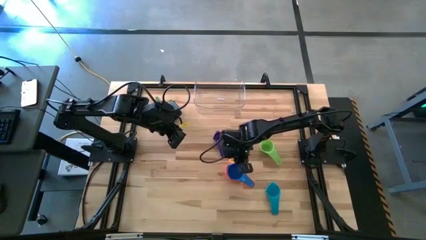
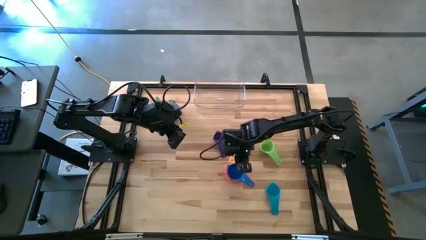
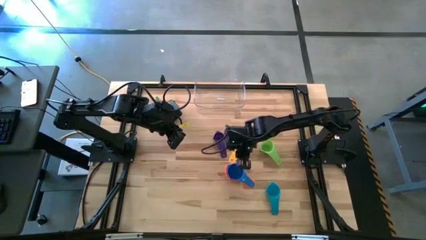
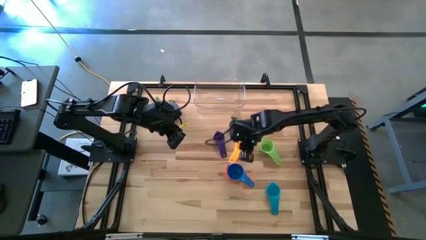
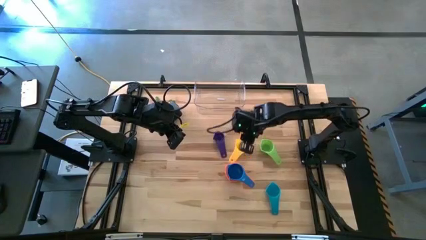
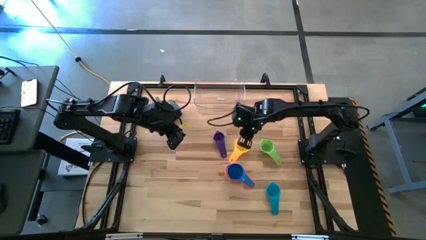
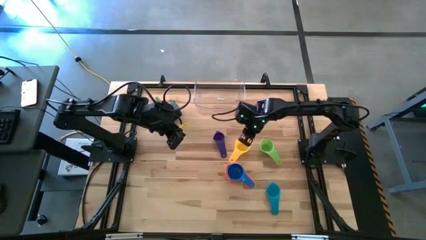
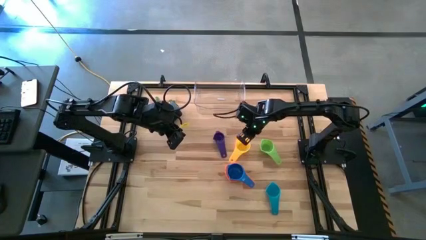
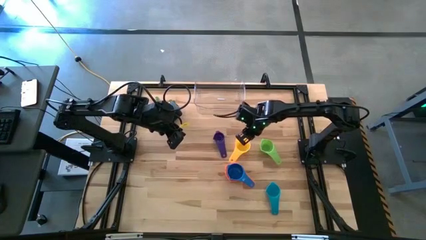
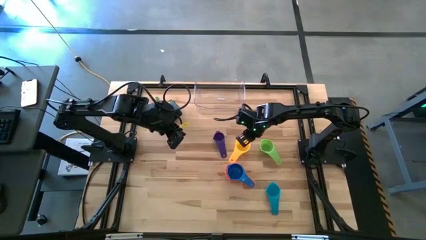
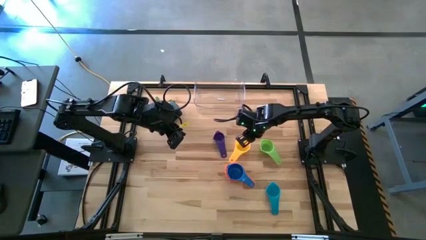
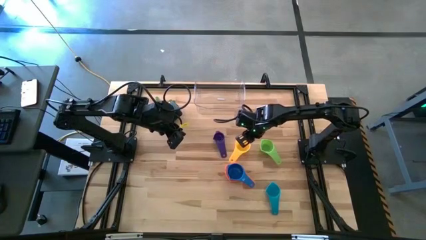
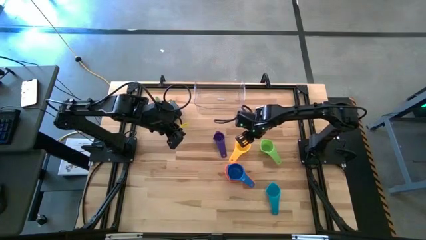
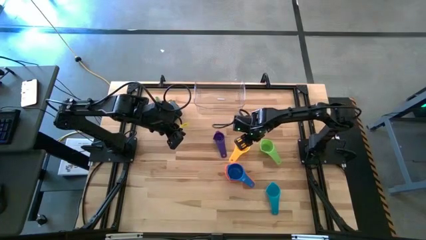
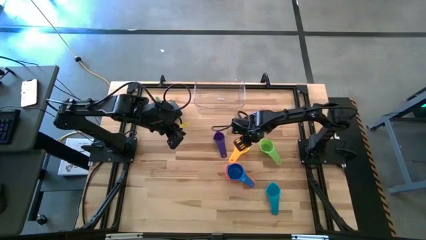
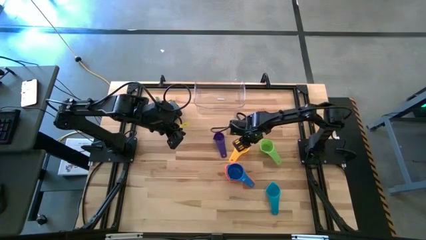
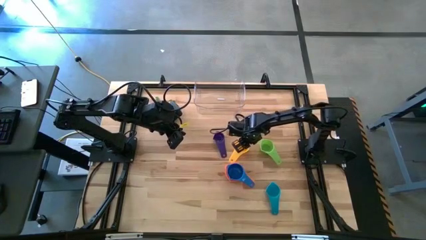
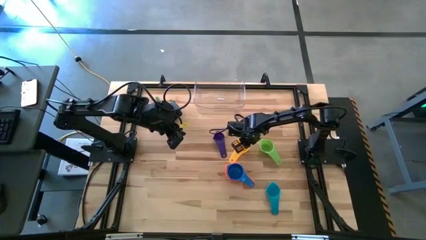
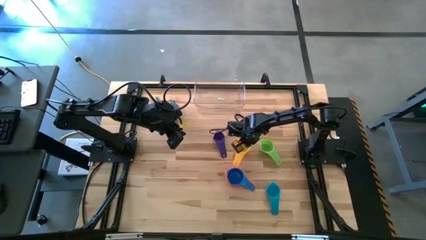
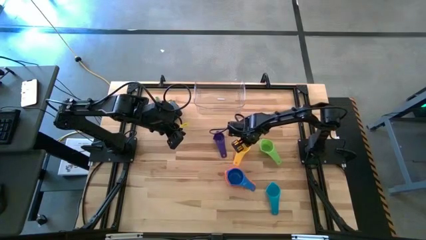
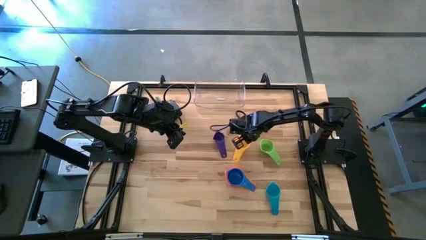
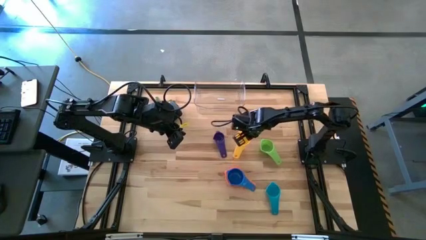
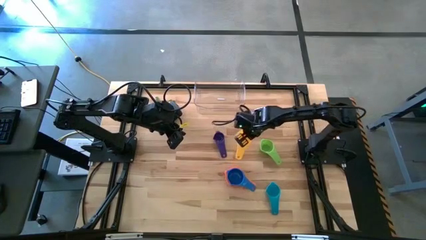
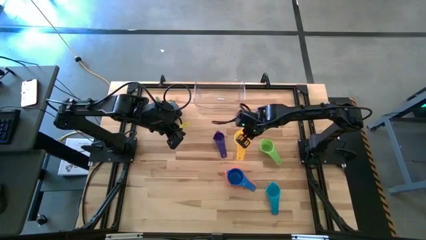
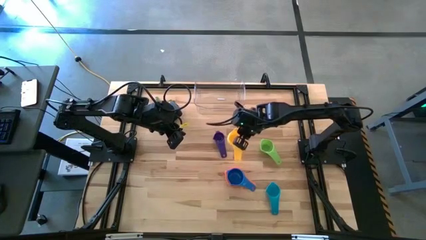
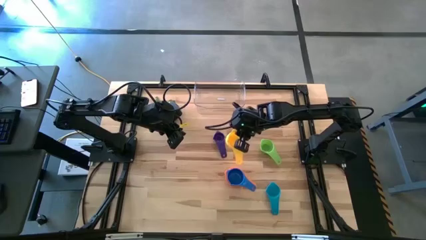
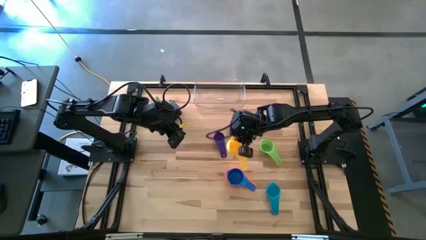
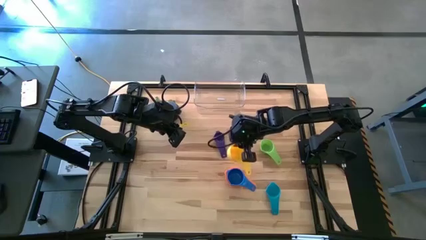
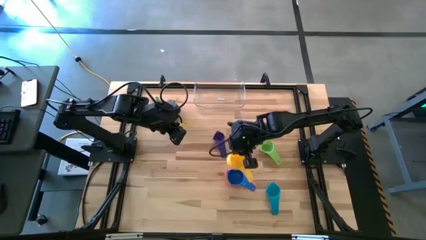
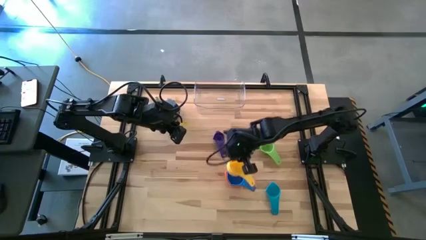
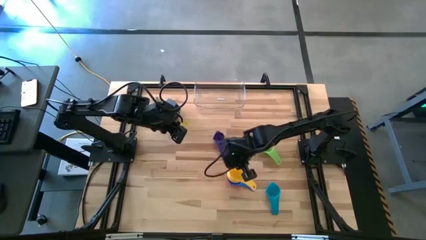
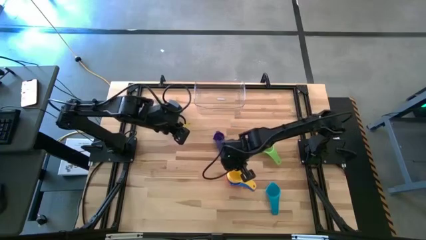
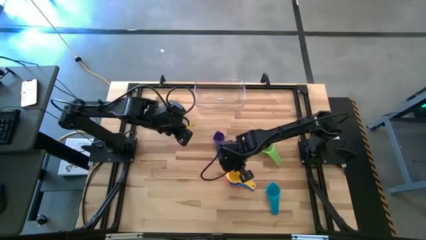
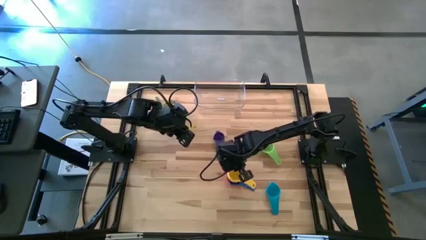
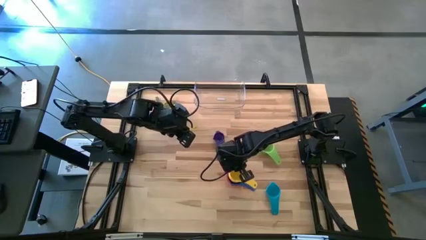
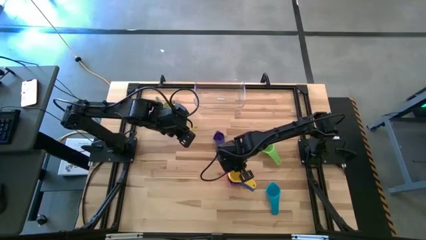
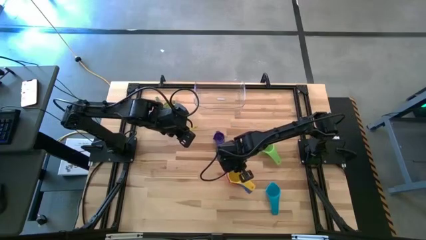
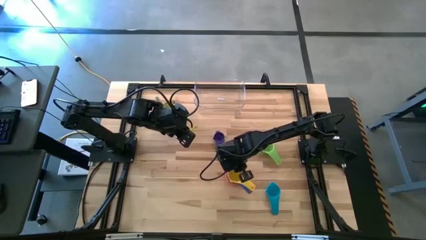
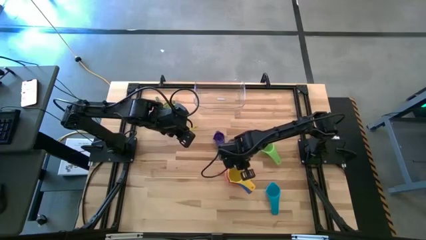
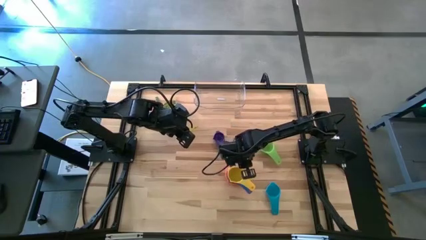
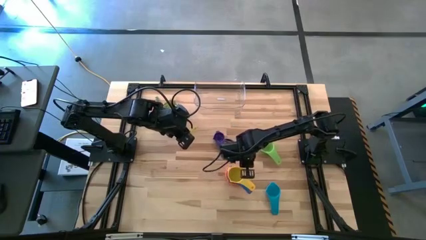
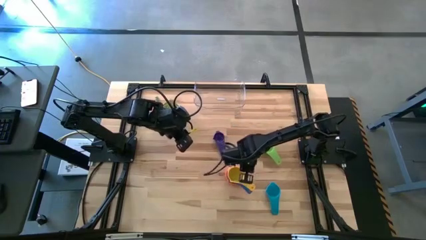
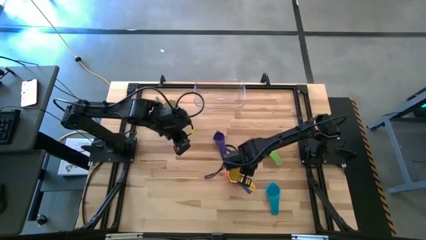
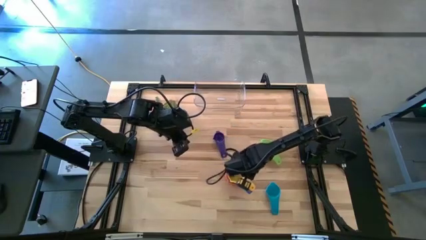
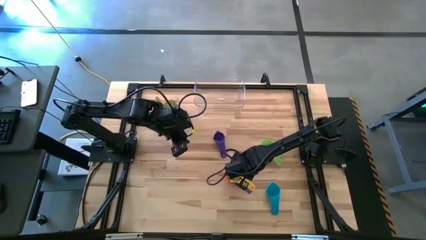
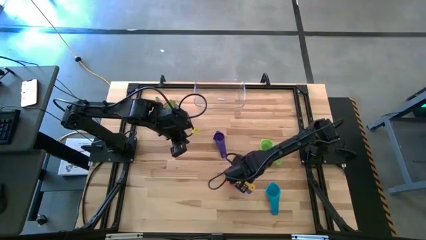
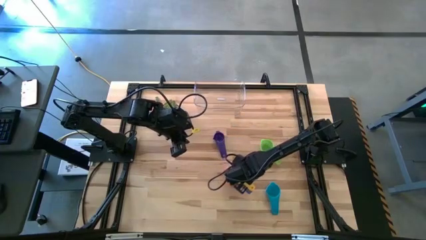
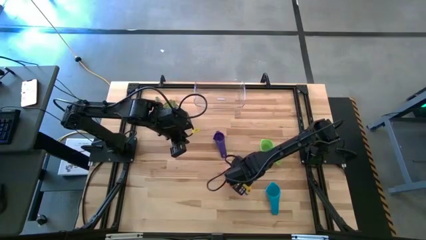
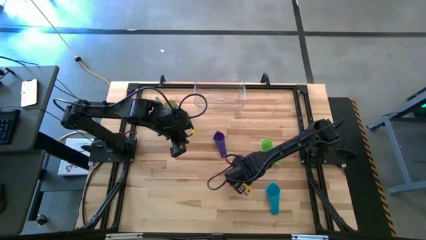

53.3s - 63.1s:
Task: Nest measuring cups in basket
Stack the yellow measuring cup on top of the blue measuring cup

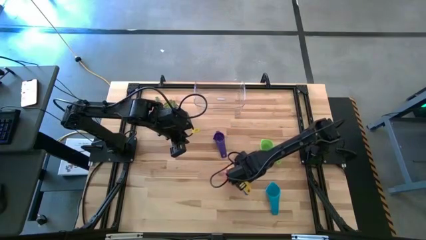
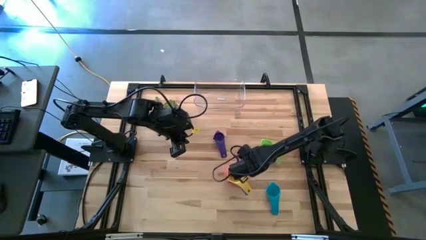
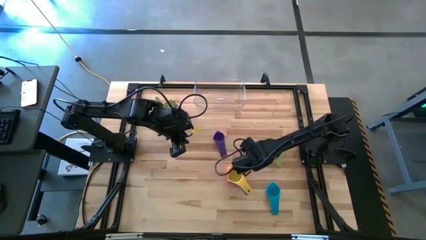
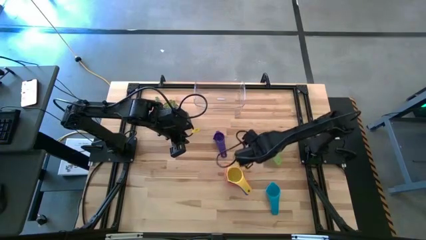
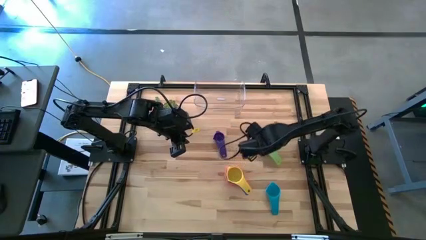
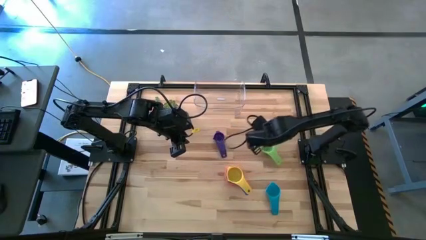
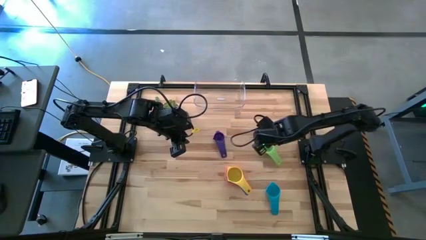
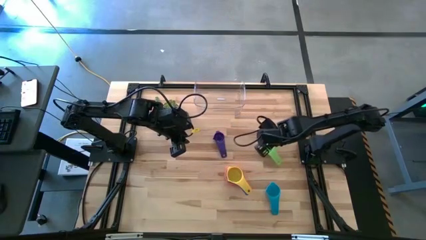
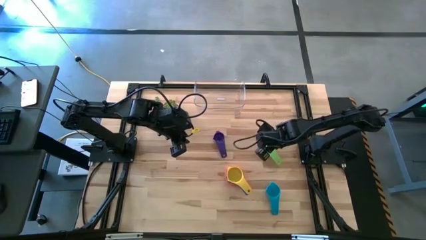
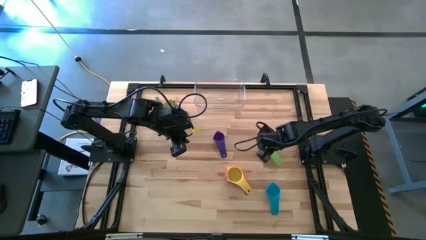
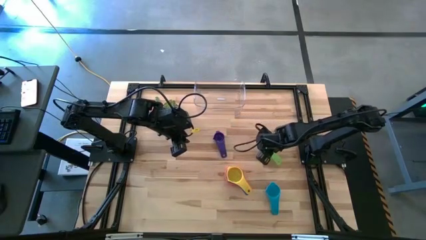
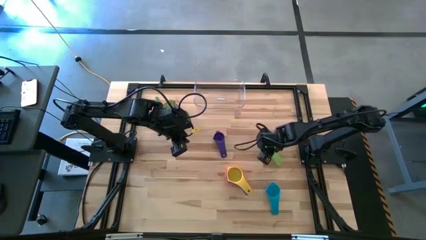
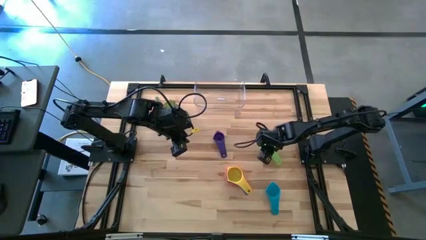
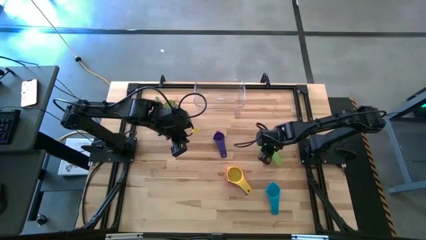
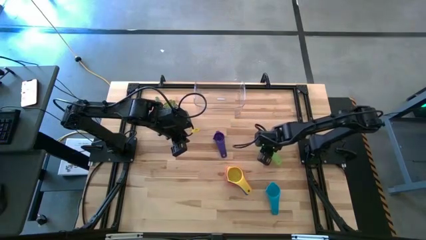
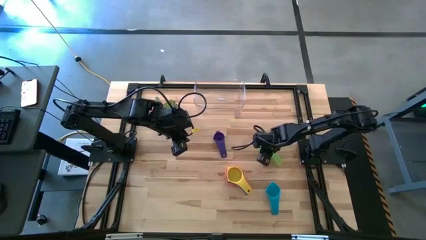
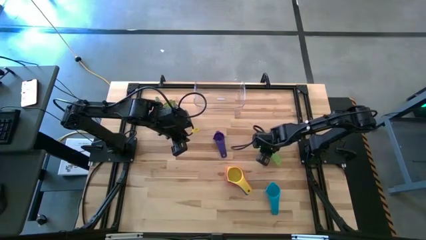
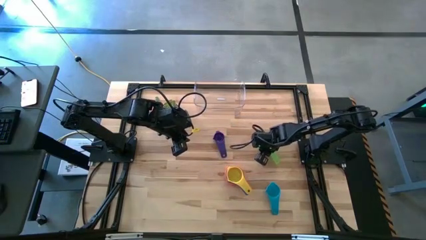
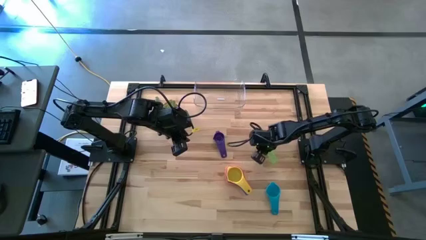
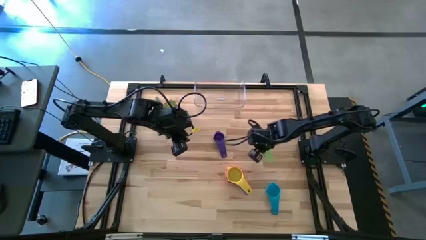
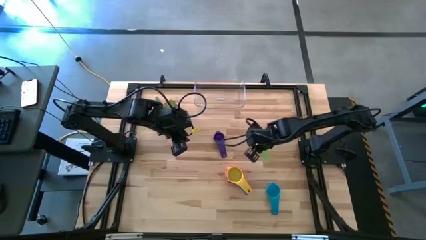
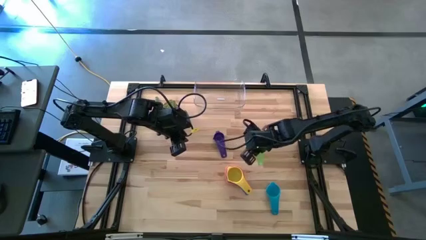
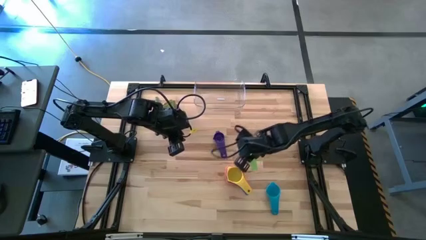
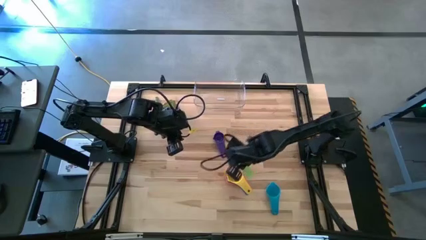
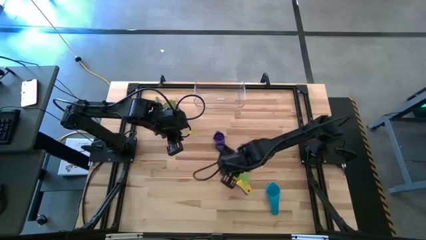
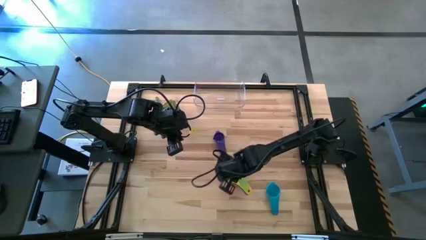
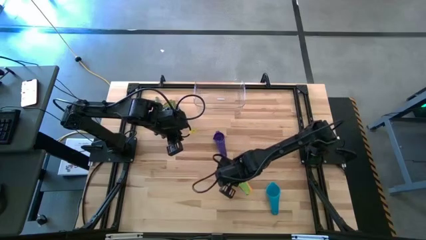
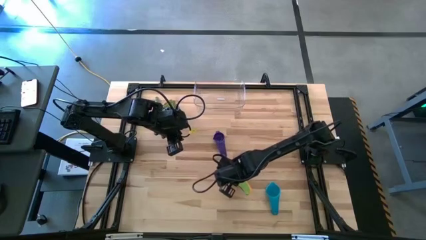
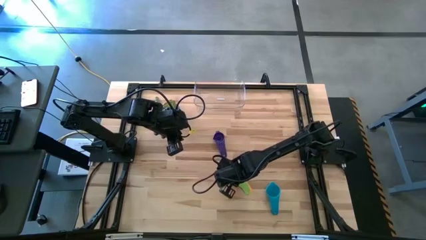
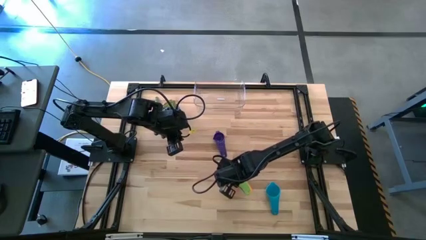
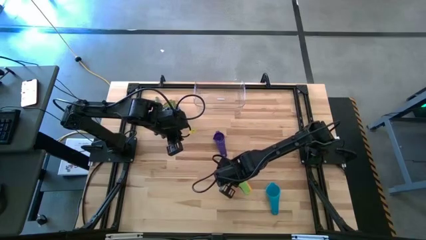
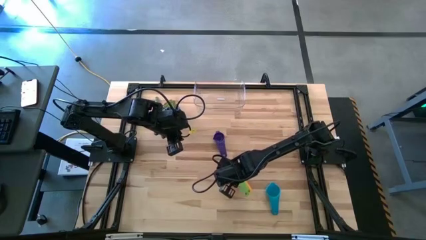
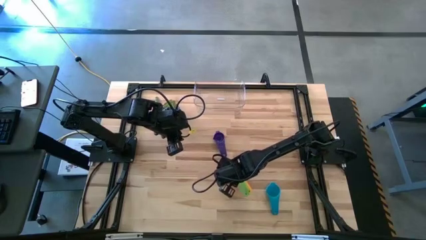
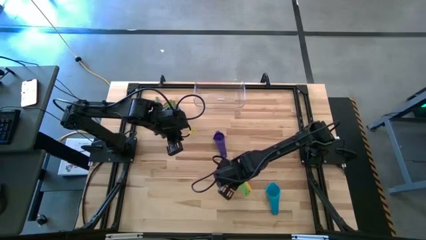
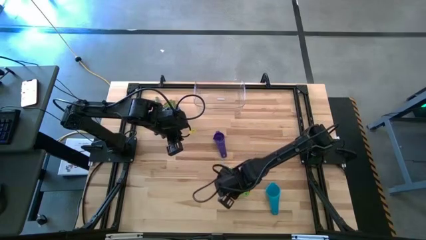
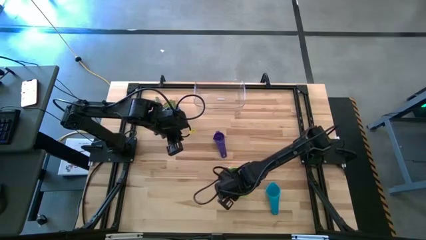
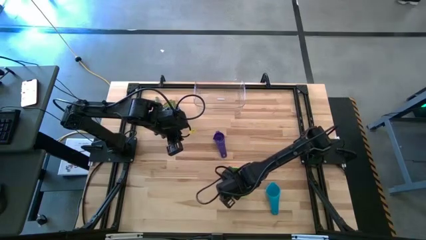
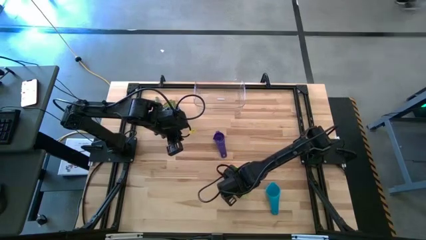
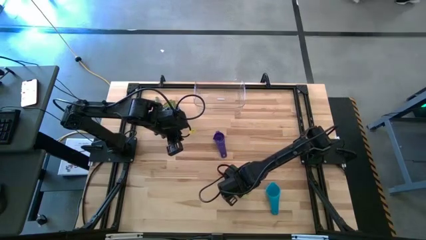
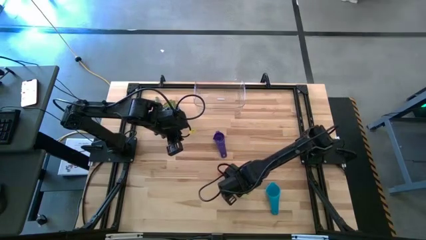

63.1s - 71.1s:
Stack the green measuring cup on top of the yellow measuring cup
